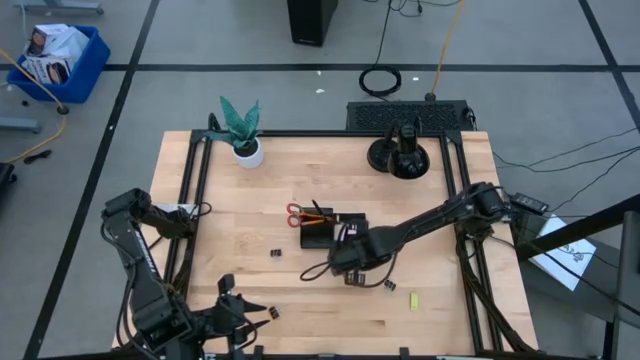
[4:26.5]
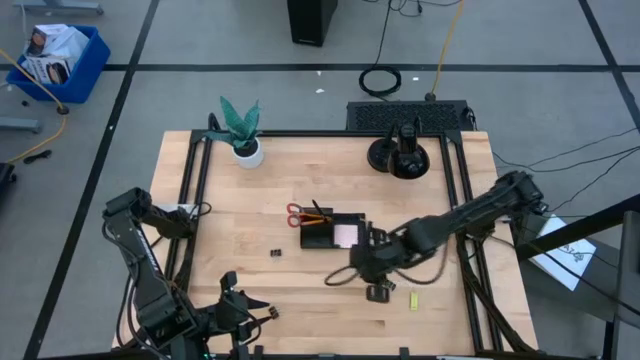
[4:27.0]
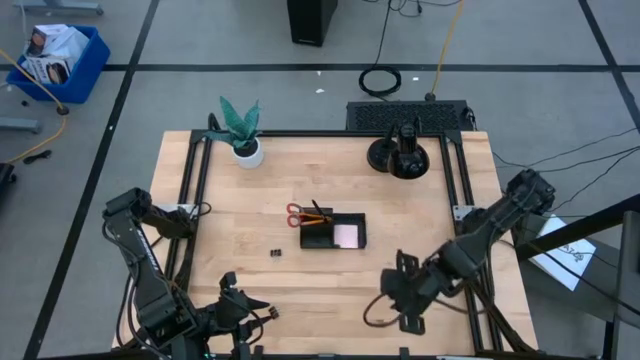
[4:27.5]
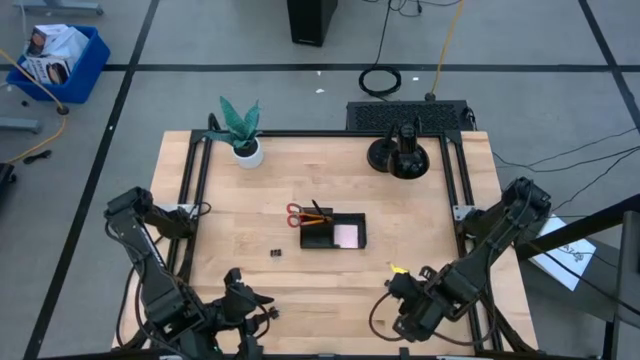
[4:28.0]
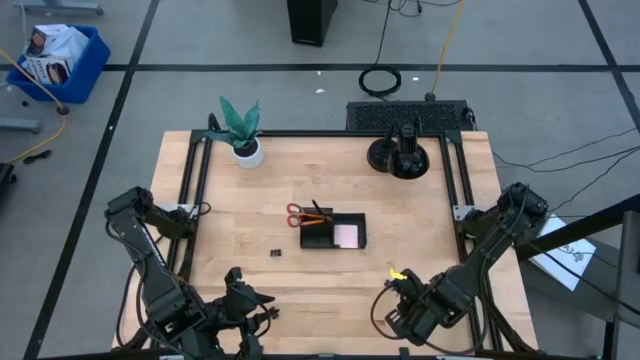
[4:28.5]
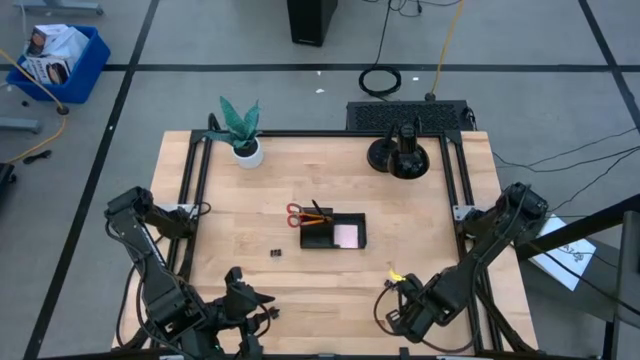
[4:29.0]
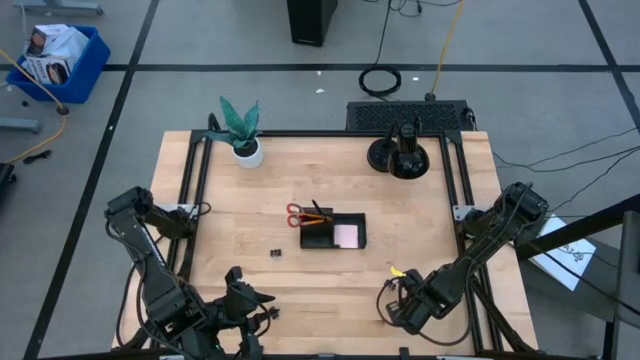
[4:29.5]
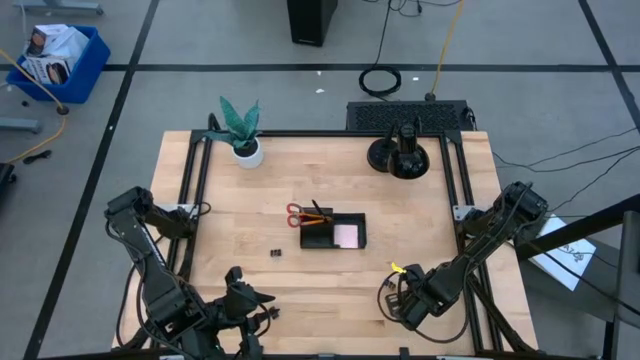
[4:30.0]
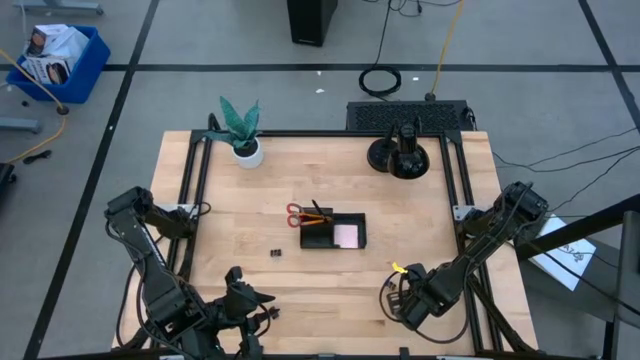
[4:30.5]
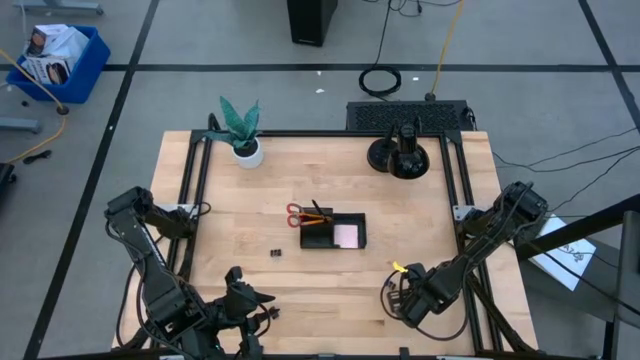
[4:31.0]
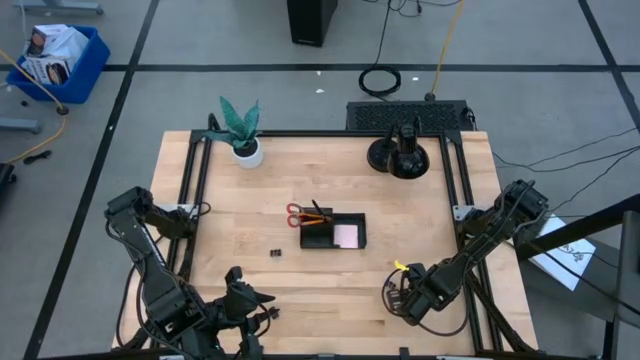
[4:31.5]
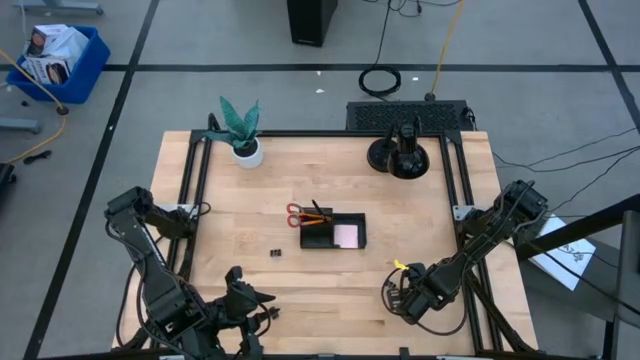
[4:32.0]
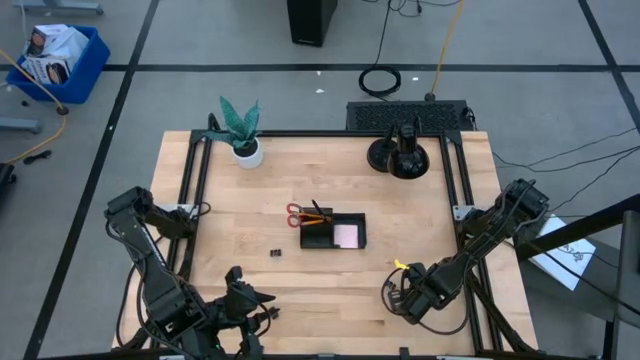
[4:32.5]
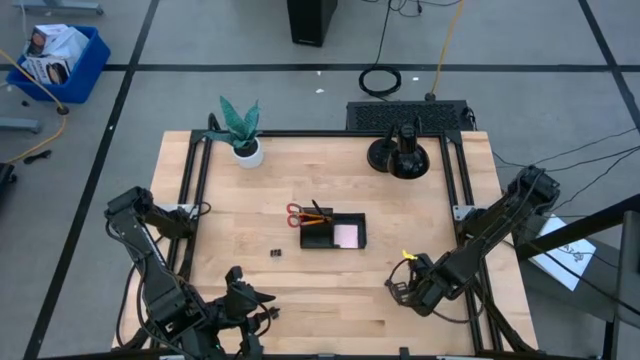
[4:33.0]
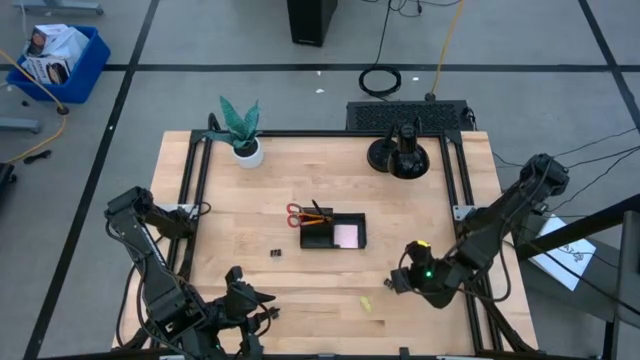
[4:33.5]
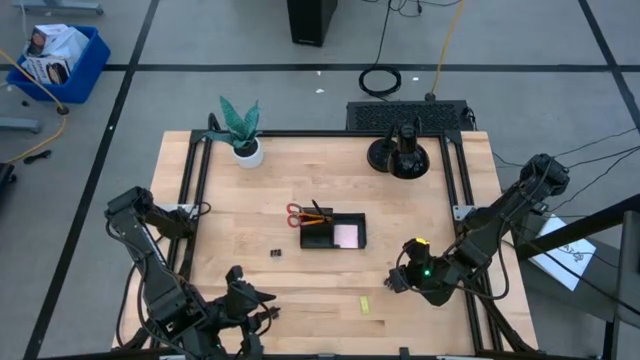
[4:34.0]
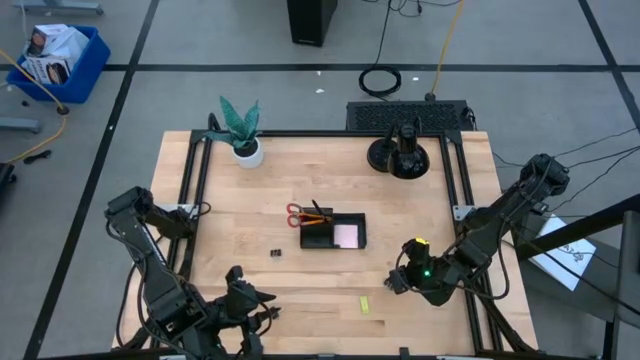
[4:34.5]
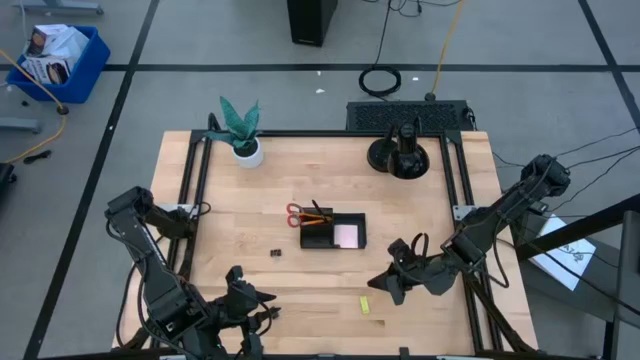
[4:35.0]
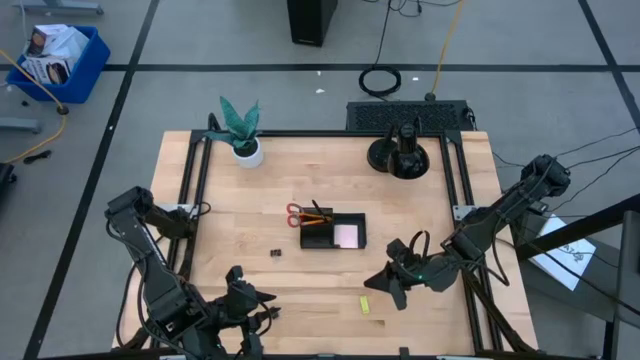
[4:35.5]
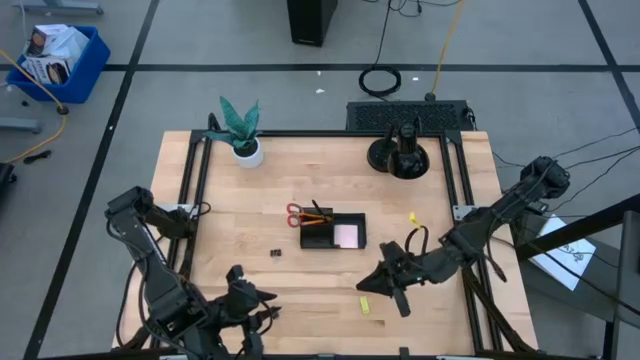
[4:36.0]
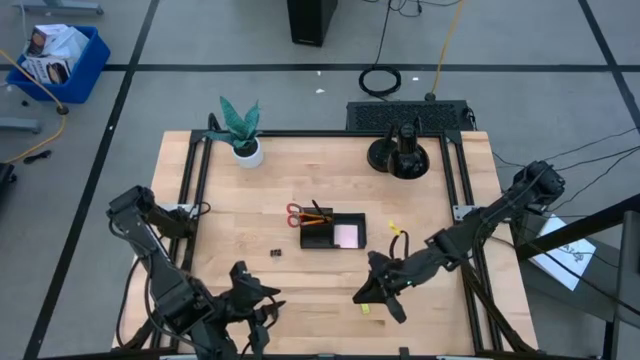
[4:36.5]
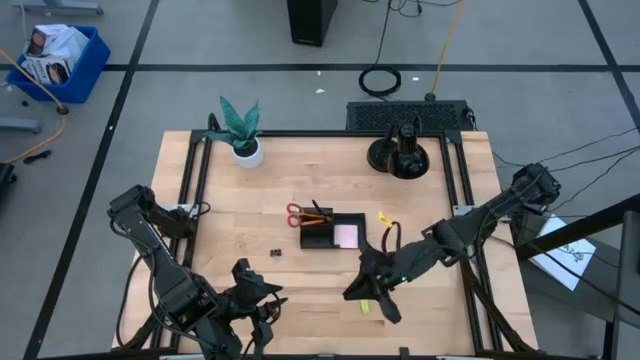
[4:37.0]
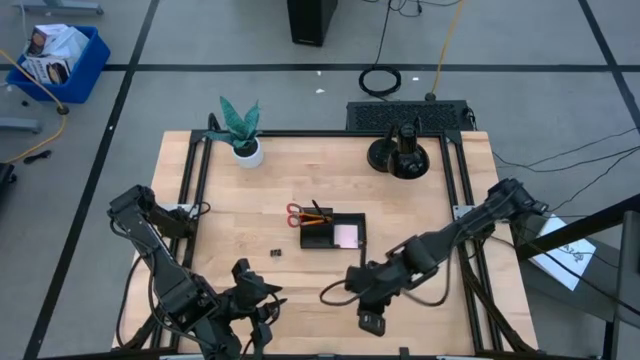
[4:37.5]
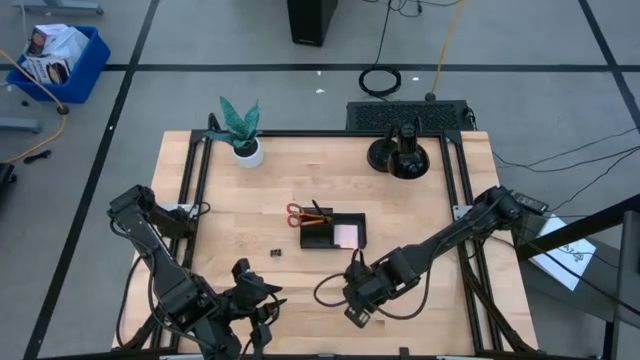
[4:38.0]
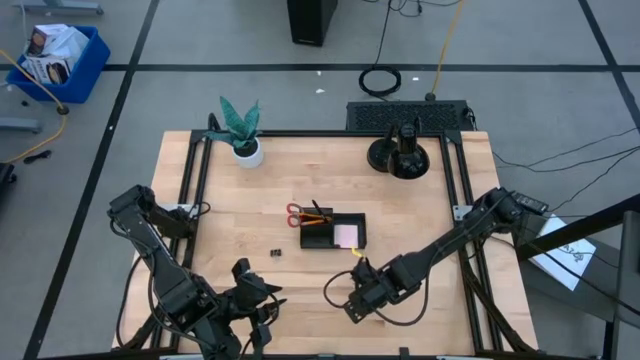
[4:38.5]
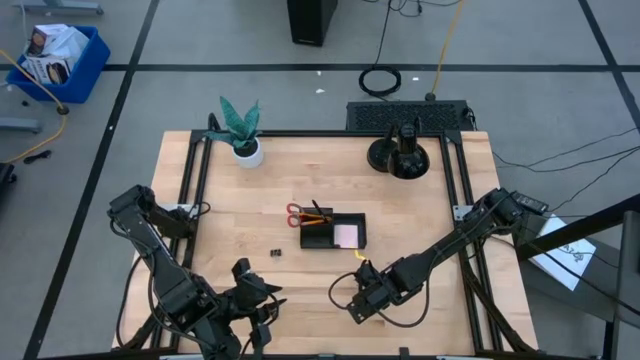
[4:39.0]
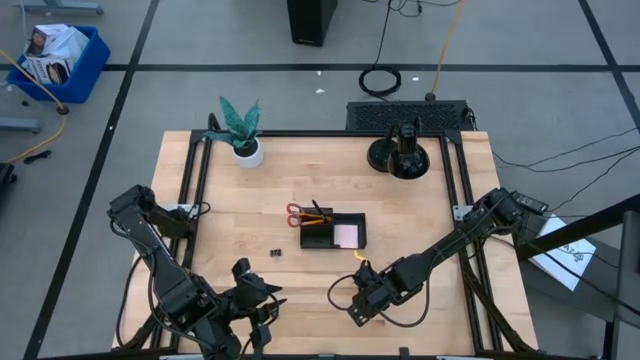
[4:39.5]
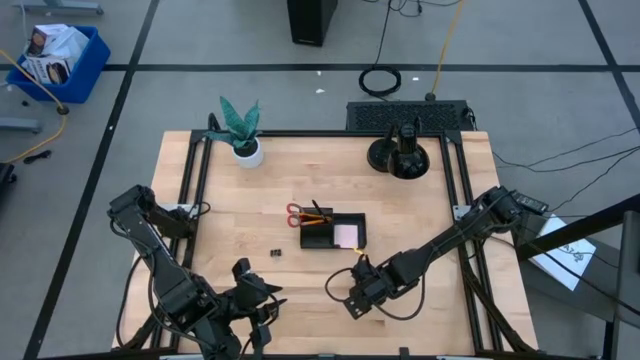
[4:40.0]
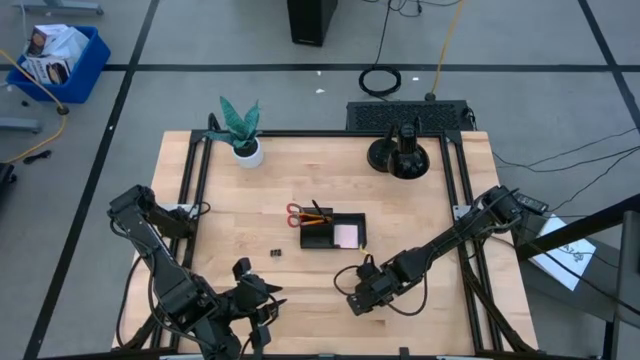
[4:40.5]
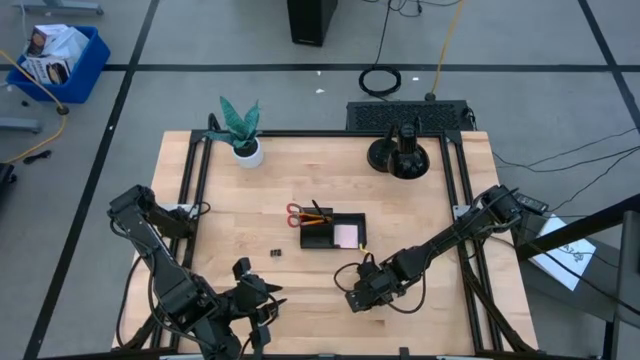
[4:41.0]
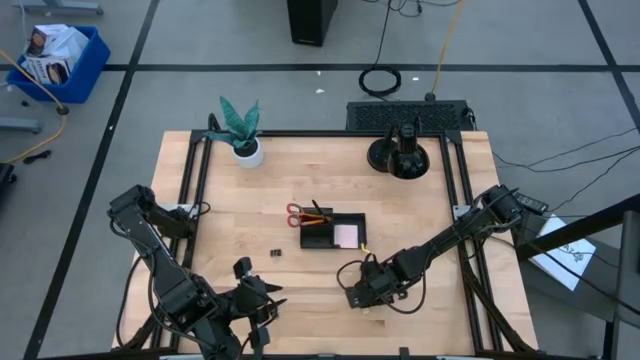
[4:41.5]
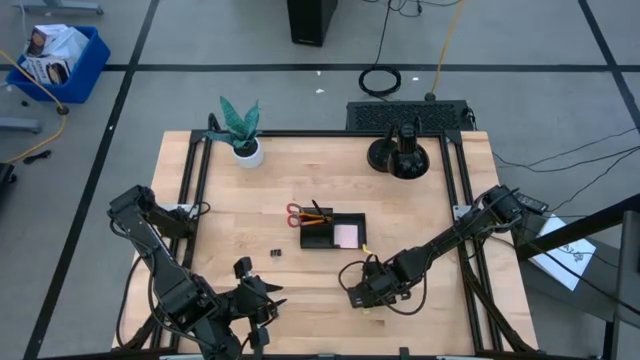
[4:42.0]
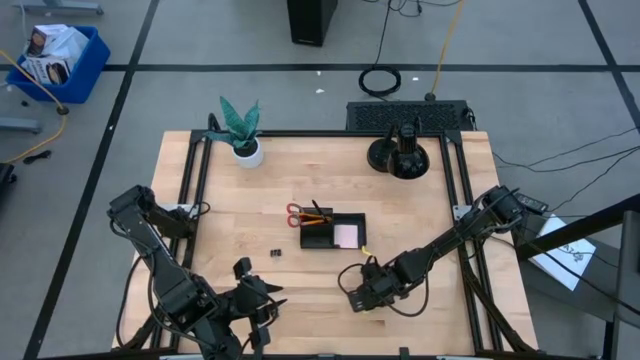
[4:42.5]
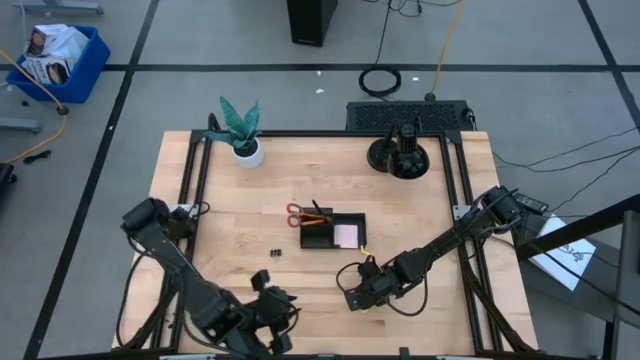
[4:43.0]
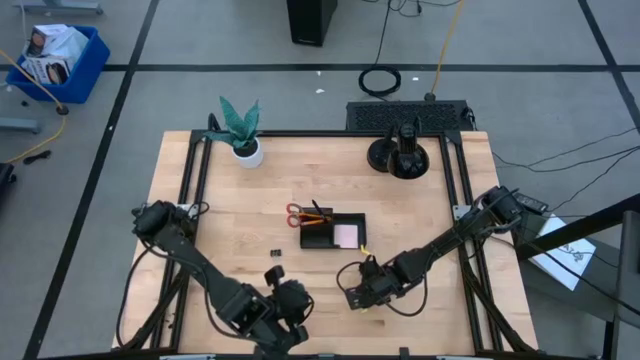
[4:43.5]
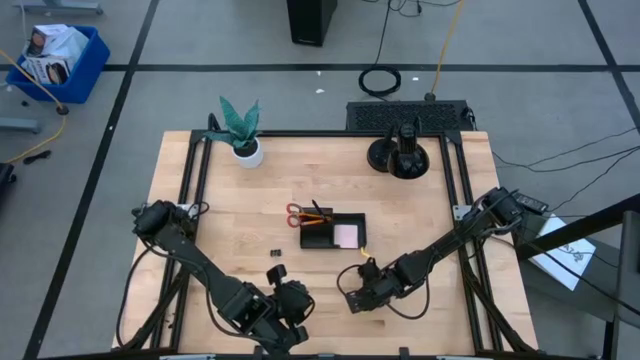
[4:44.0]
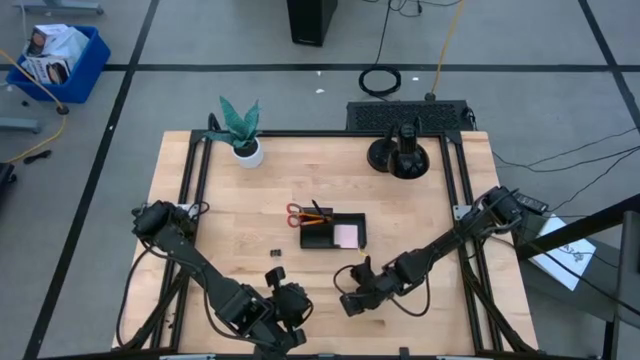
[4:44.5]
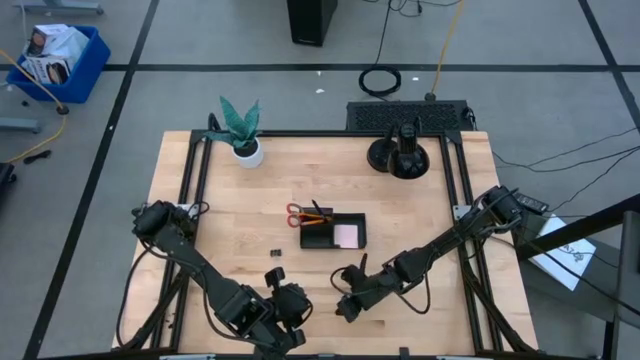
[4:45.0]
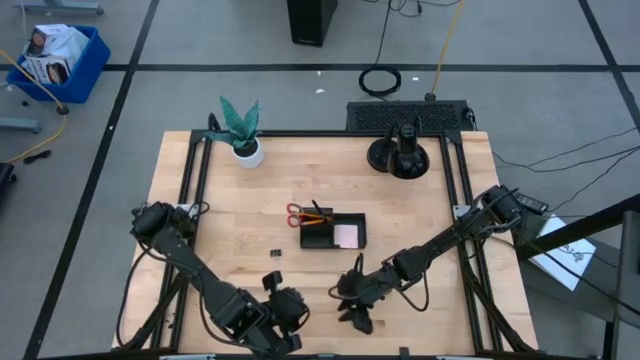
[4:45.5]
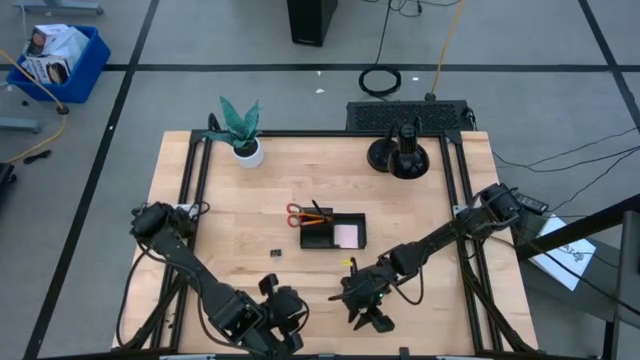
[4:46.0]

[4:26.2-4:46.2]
Task: Pick and place office supplies into organizer
Put the green eraser into the desk organizer

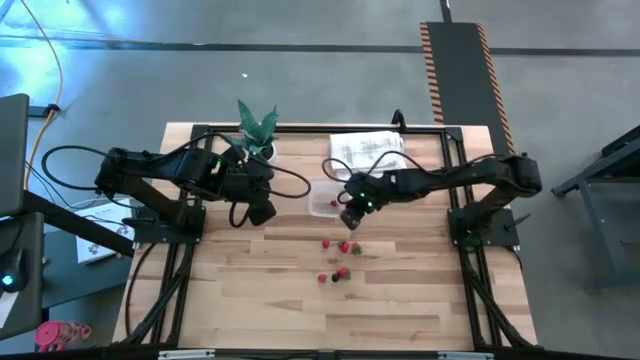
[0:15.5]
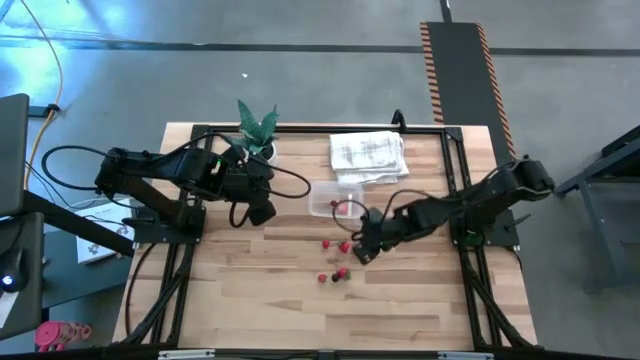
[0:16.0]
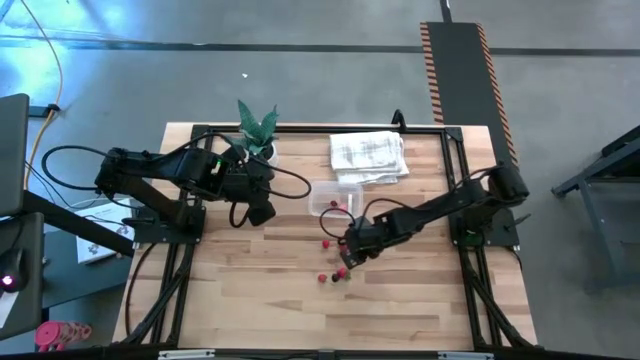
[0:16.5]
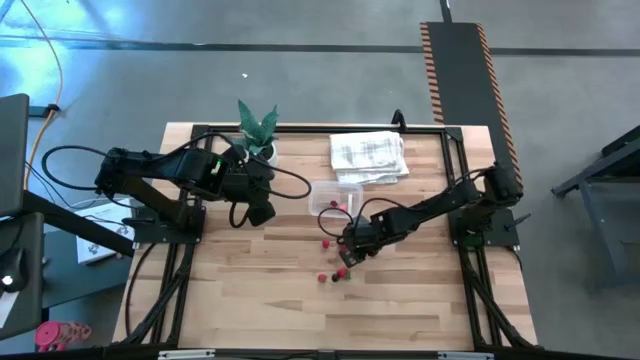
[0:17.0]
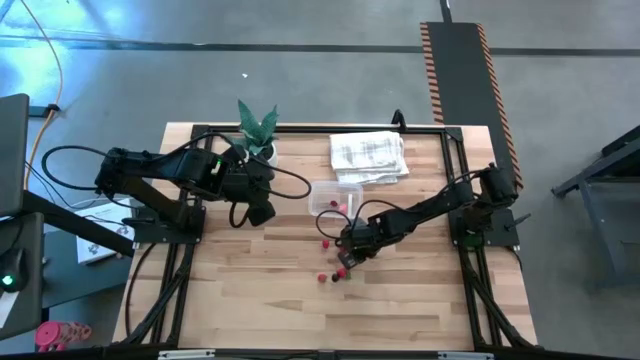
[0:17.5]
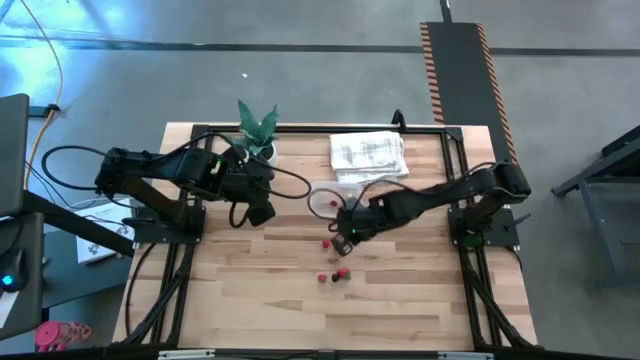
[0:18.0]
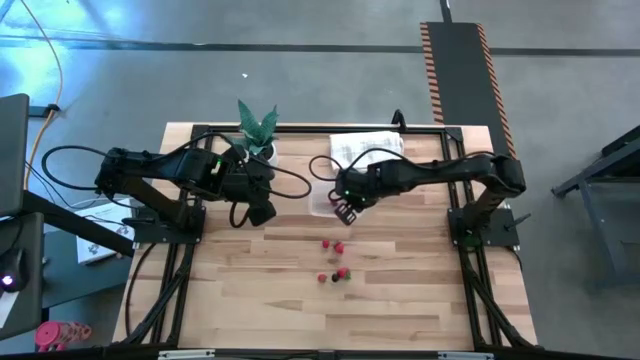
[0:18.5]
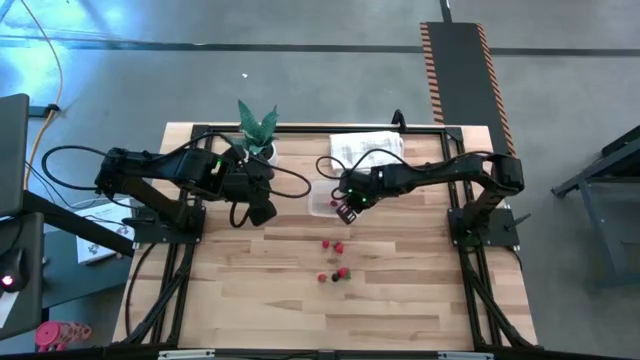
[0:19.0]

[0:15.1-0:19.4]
Task: Pick and placing Produce into tupperware
Put the strawberry into the transparent bin
